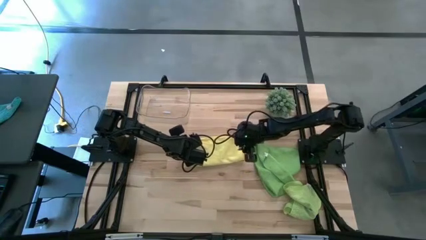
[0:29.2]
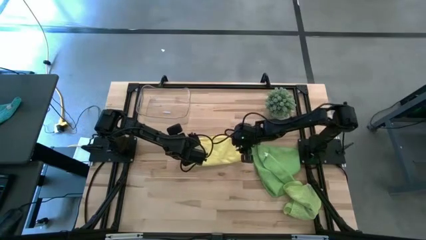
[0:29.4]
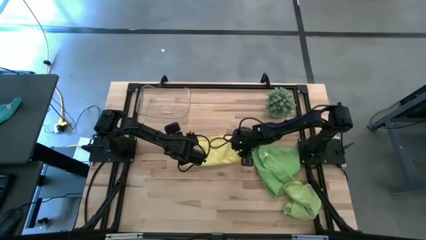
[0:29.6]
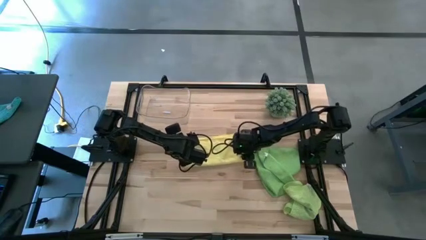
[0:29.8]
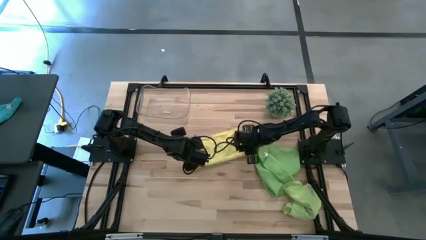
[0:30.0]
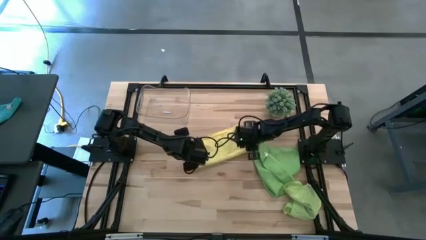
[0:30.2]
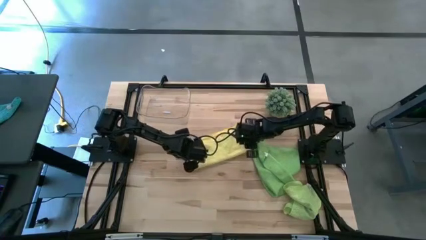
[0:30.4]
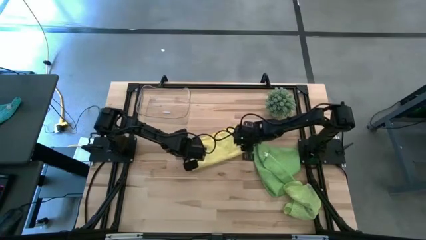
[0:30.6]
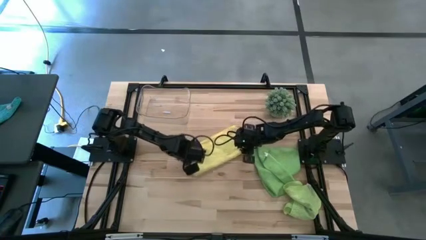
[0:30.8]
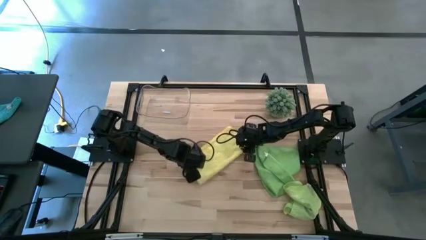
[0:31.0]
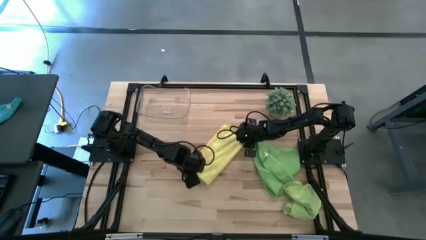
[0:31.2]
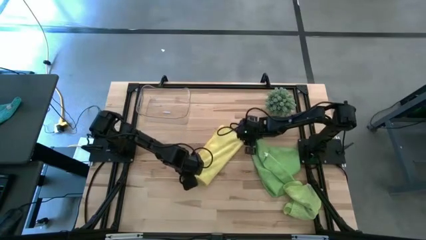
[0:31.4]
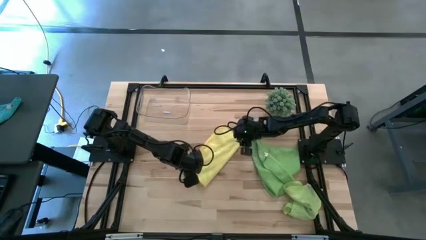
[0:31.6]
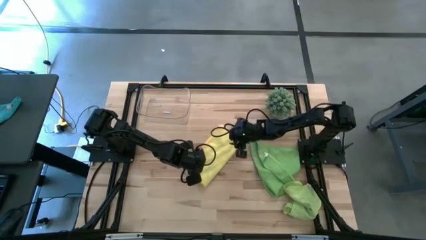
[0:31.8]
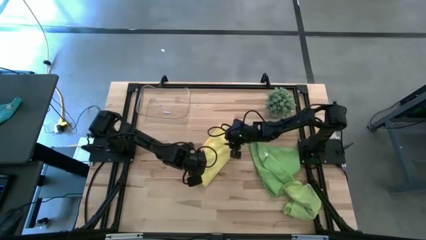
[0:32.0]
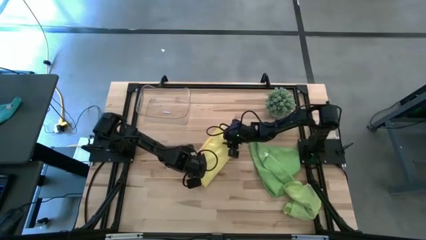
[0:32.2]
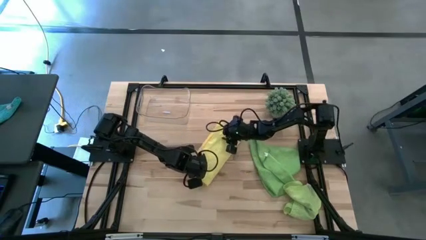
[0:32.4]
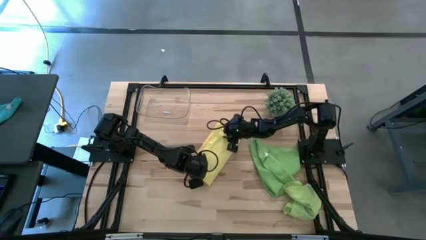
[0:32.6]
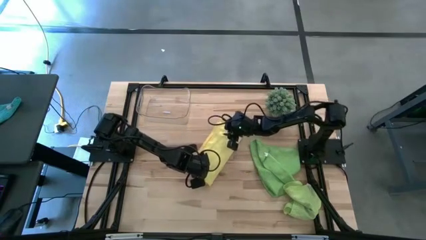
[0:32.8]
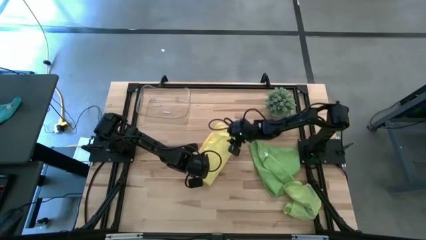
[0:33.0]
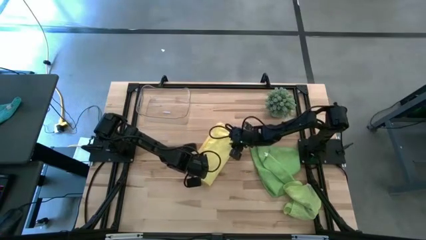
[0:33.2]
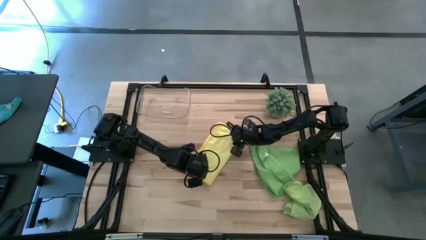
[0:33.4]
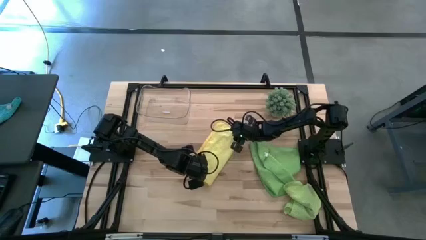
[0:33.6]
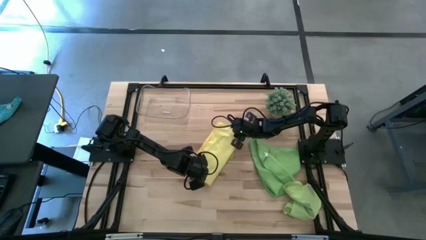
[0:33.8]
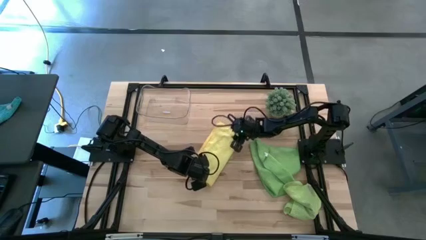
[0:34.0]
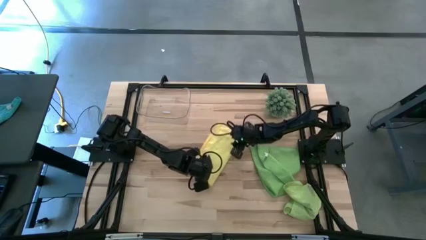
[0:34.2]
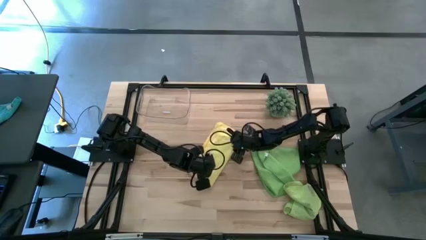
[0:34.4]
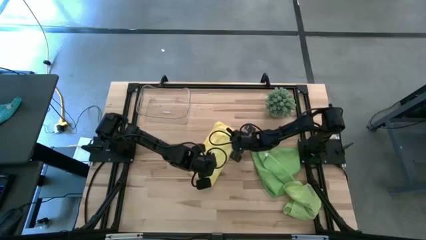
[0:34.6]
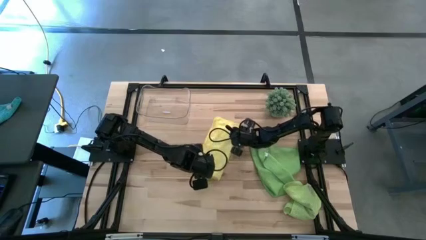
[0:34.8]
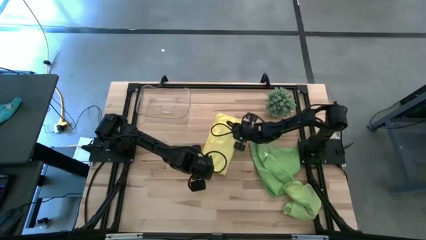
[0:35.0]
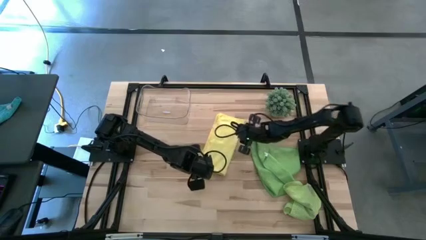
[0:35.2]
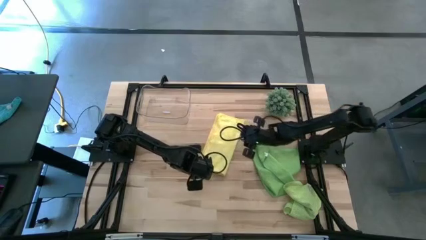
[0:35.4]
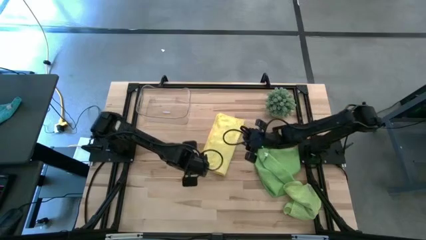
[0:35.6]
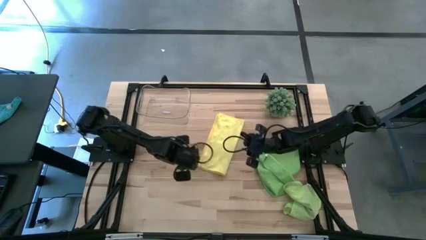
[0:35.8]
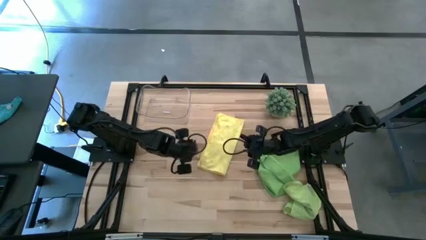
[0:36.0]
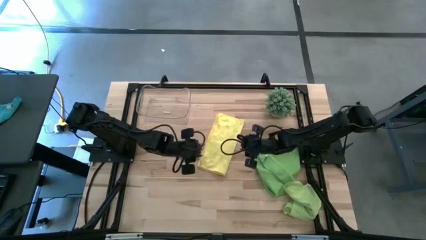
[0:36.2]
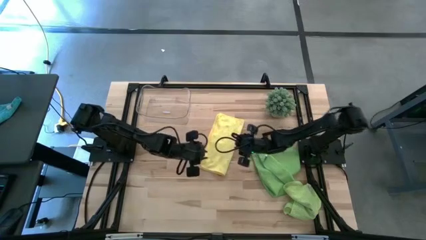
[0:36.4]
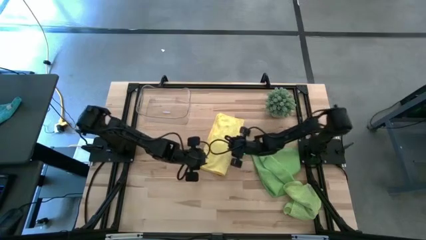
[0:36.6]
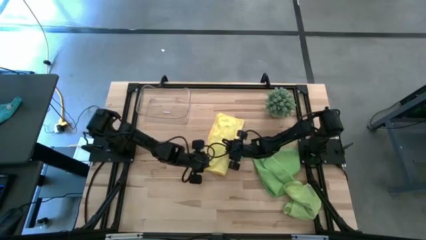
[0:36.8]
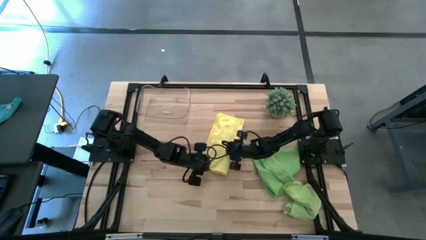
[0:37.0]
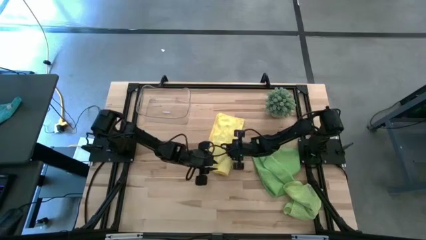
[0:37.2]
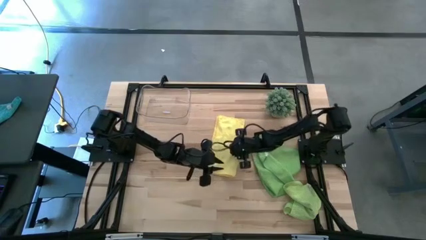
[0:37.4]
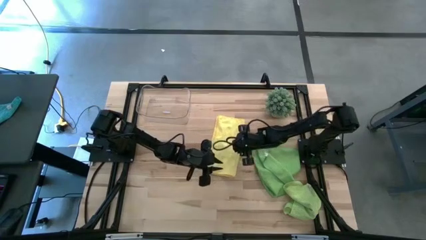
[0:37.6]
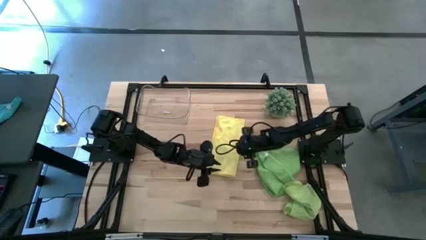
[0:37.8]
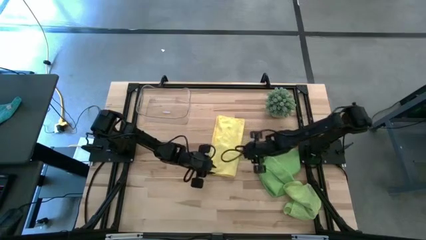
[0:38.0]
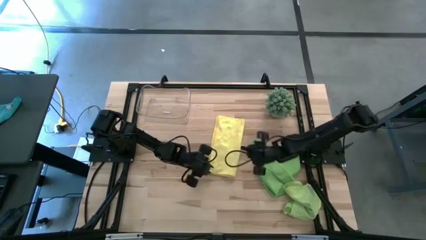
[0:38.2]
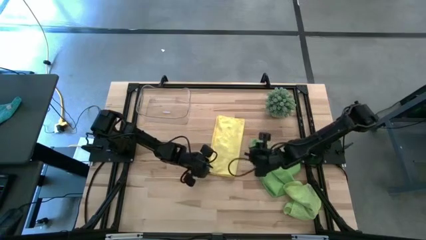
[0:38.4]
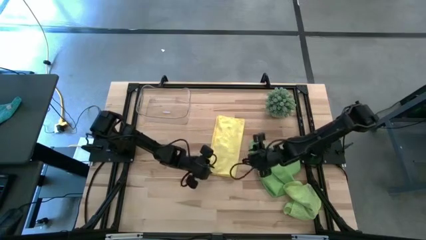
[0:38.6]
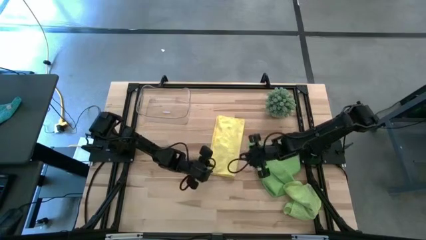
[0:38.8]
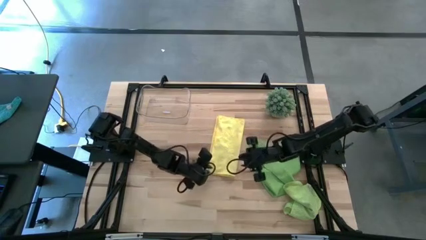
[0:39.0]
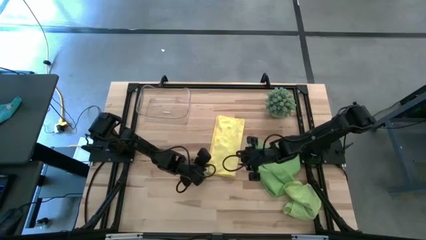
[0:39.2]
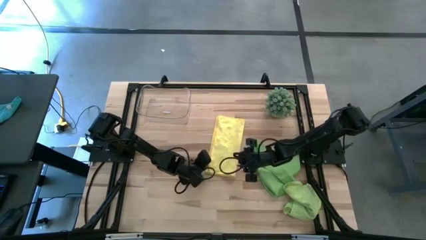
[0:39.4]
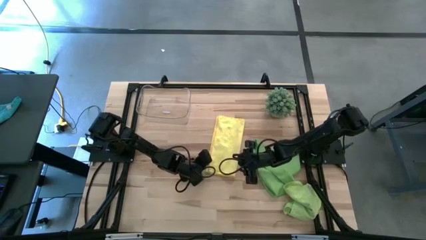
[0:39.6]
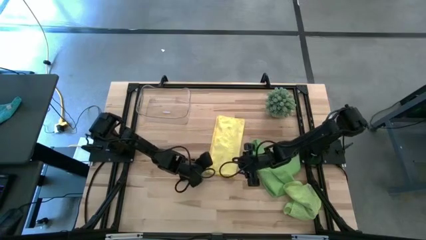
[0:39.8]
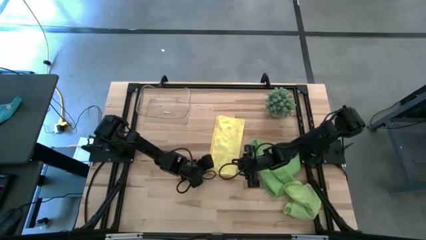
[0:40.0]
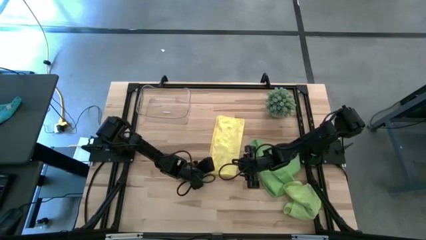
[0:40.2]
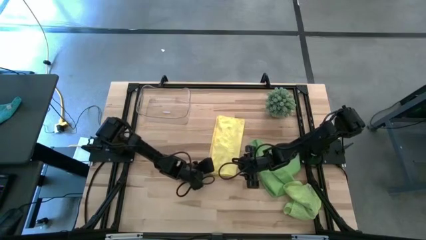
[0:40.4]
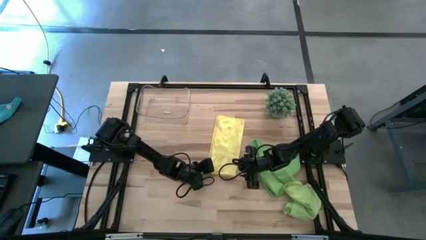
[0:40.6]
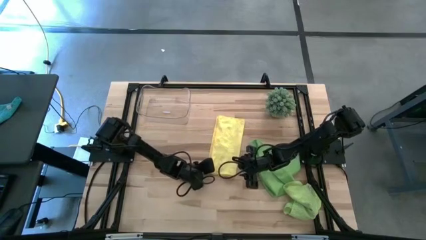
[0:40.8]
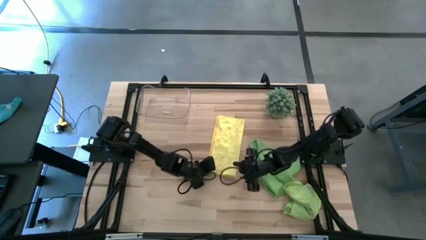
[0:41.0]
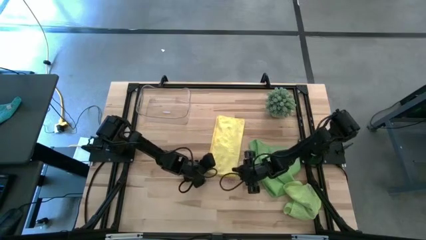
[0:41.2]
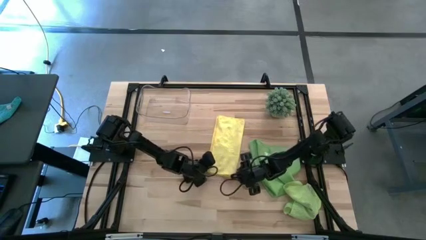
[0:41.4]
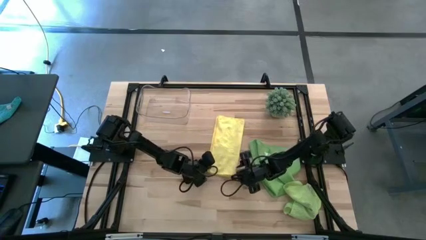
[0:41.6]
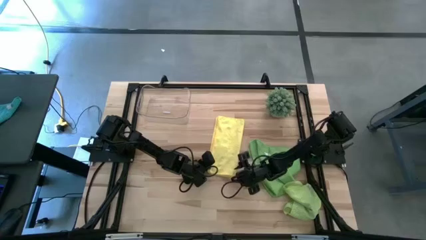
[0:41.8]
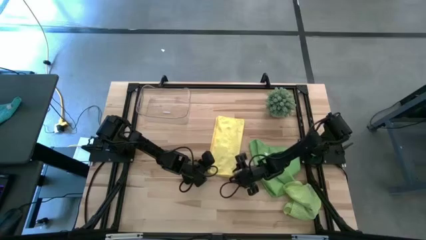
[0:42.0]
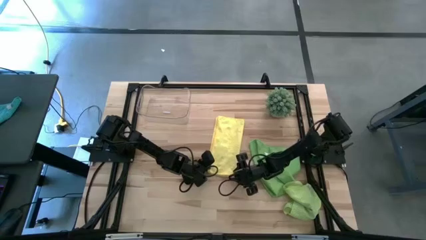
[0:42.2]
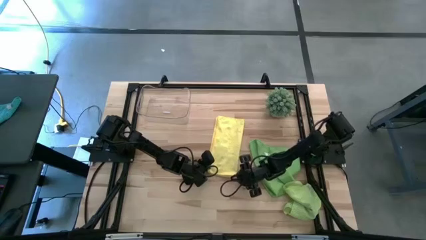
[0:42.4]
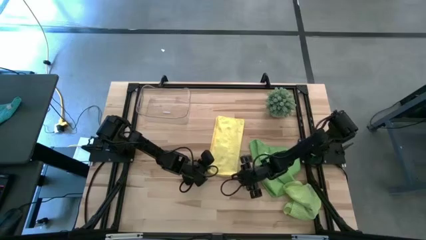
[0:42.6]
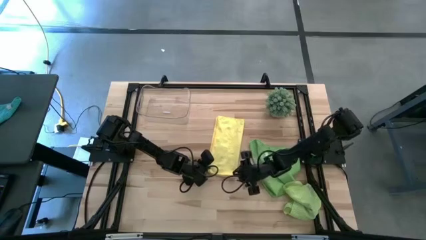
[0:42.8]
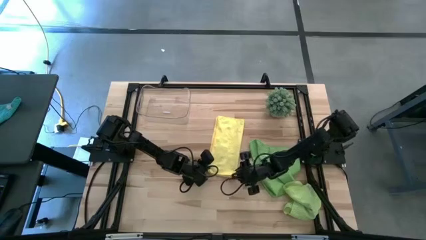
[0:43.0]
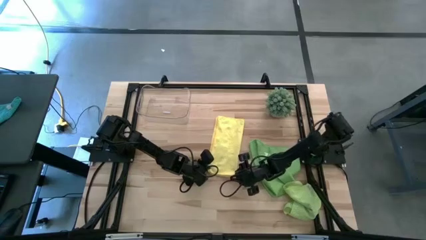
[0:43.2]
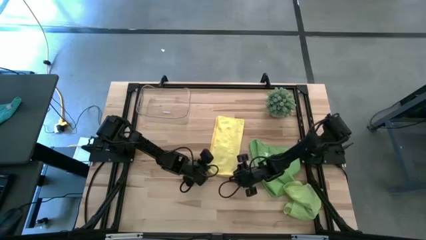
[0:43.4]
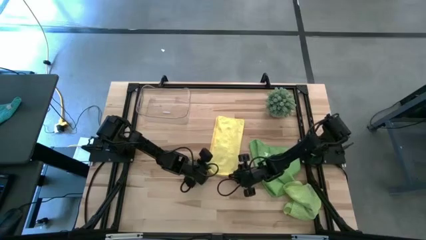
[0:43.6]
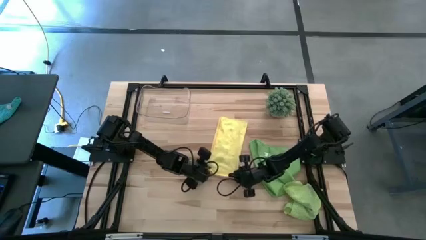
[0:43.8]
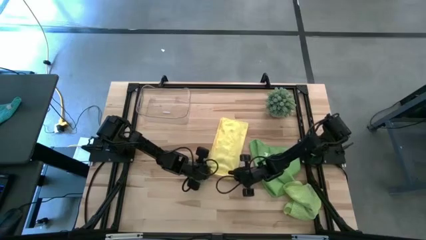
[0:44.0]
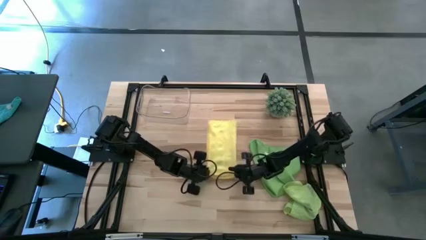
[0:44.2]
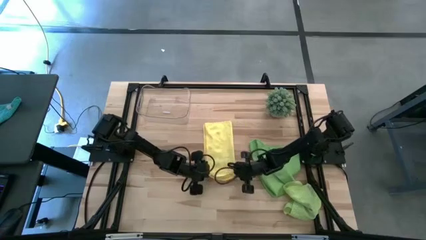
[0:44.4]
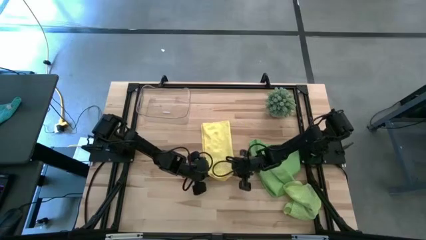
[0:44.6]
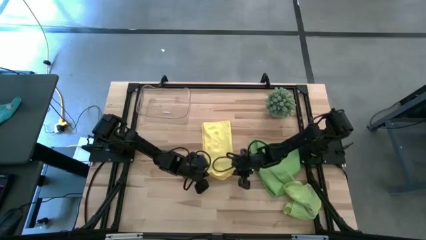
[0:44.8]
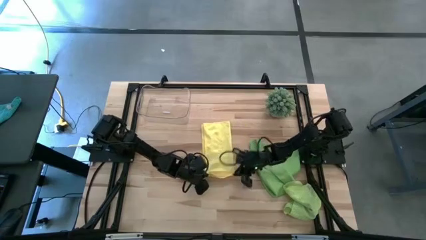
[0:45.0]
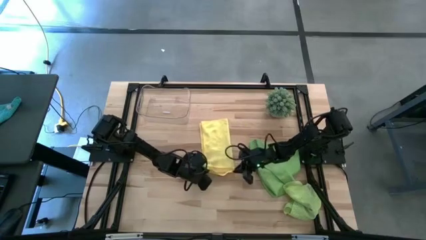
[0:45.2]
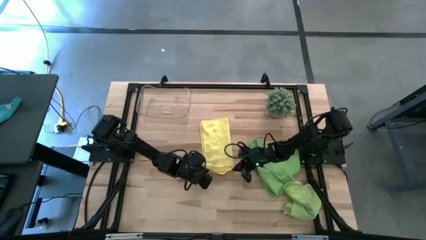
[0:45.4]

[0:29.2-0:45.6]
Task: Roll microfiber towels into tight, uniform cylinder then place into a basket
Roll the yellow microfiber cloth
